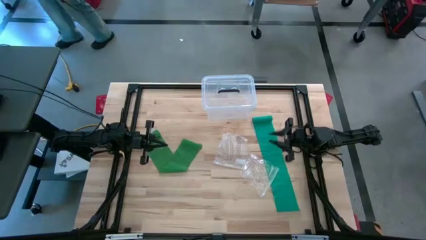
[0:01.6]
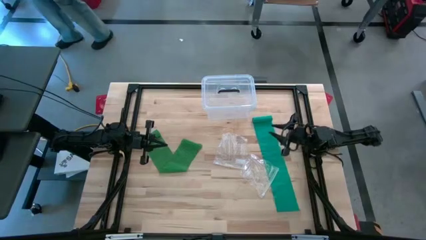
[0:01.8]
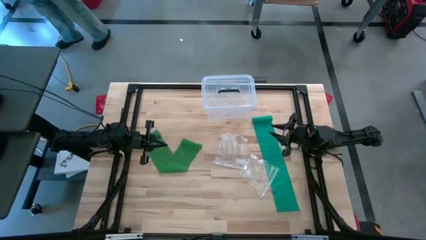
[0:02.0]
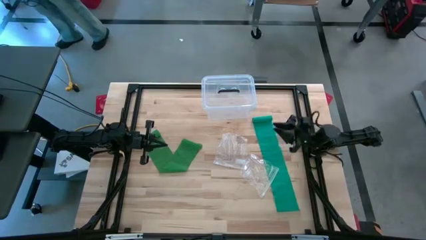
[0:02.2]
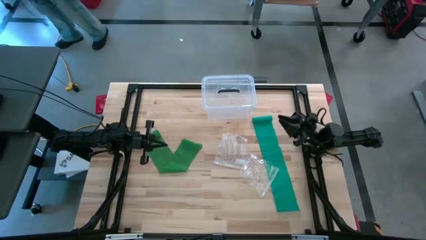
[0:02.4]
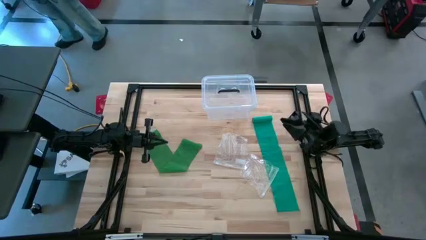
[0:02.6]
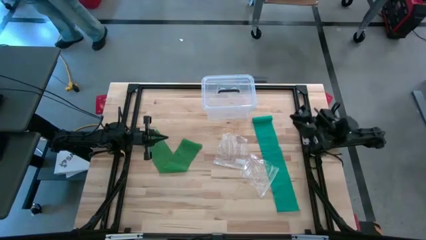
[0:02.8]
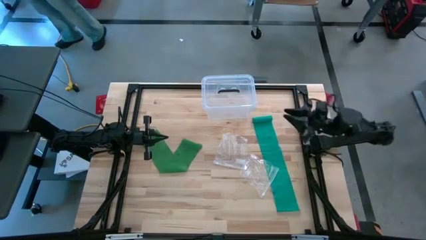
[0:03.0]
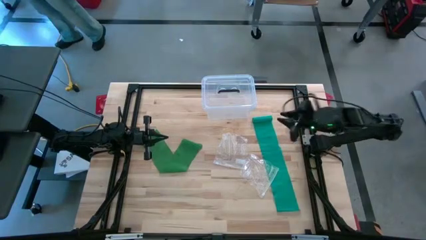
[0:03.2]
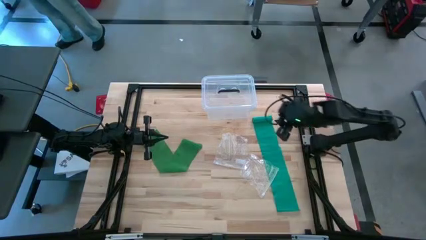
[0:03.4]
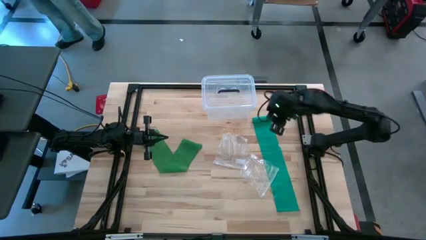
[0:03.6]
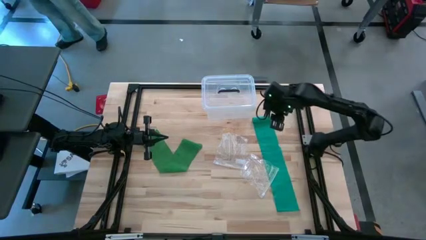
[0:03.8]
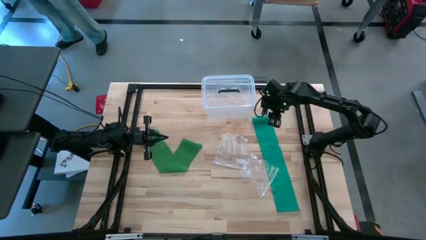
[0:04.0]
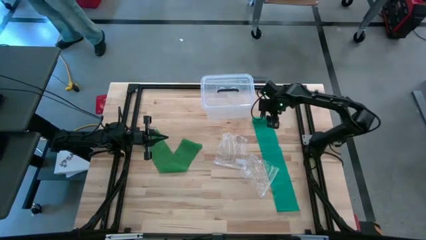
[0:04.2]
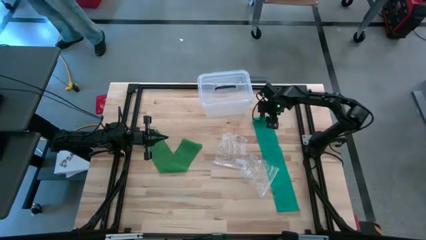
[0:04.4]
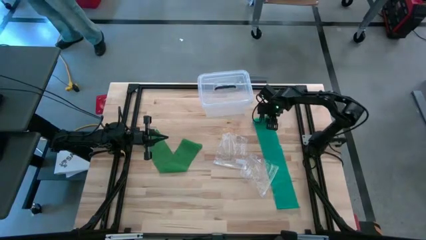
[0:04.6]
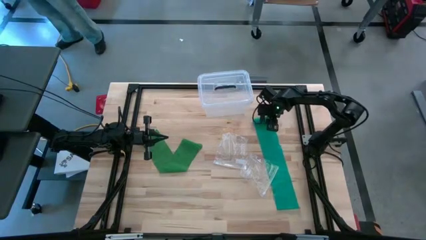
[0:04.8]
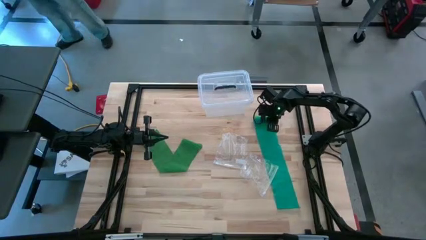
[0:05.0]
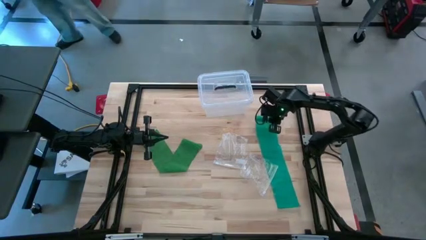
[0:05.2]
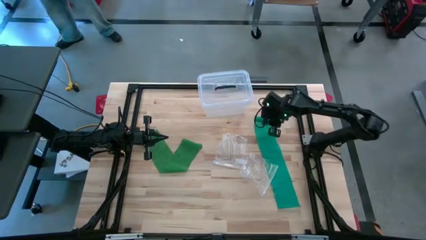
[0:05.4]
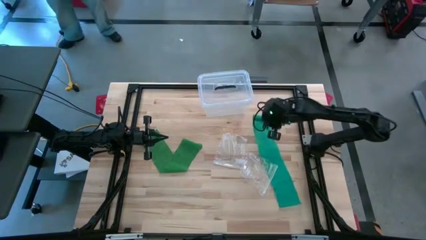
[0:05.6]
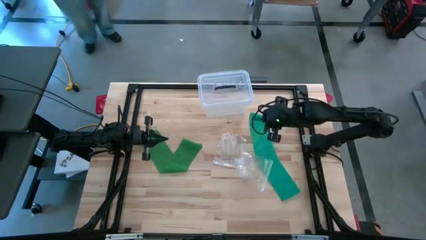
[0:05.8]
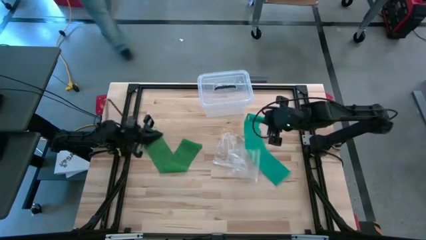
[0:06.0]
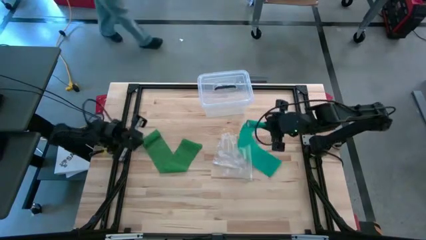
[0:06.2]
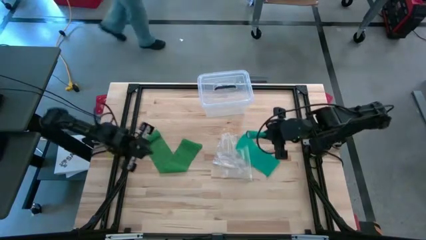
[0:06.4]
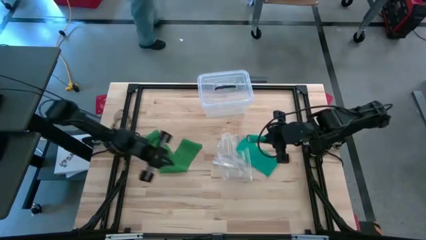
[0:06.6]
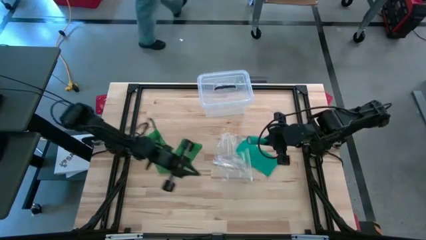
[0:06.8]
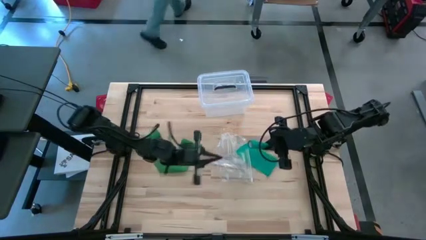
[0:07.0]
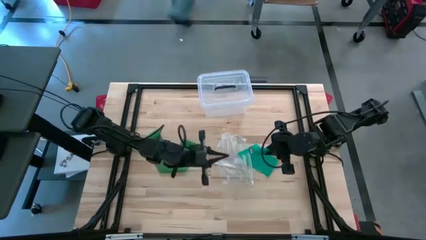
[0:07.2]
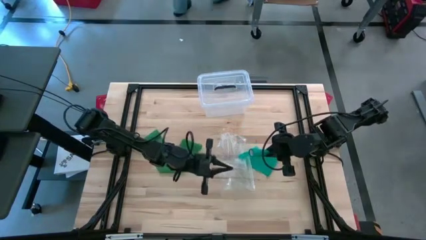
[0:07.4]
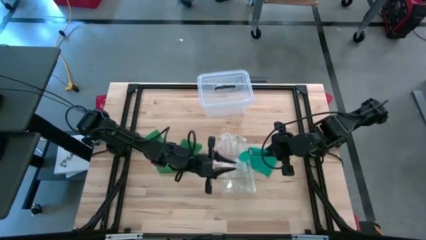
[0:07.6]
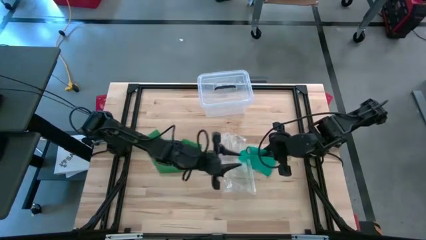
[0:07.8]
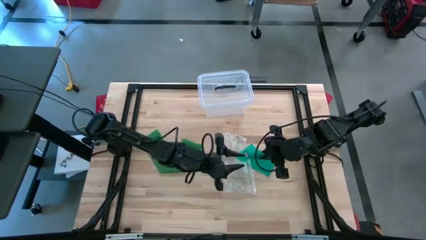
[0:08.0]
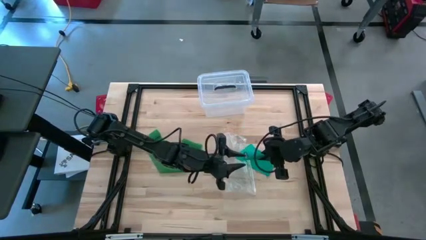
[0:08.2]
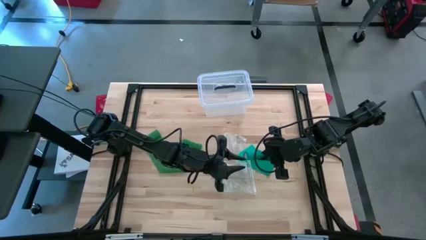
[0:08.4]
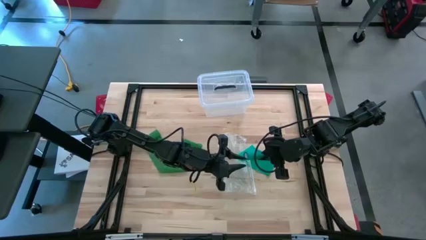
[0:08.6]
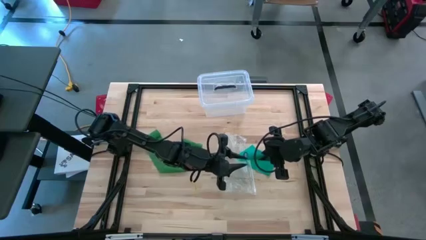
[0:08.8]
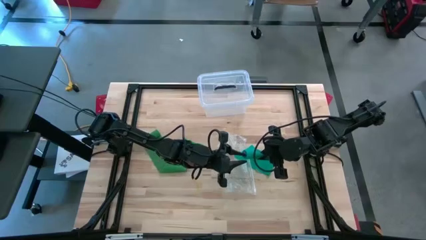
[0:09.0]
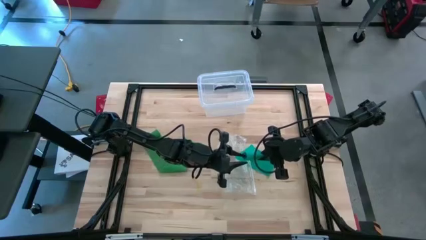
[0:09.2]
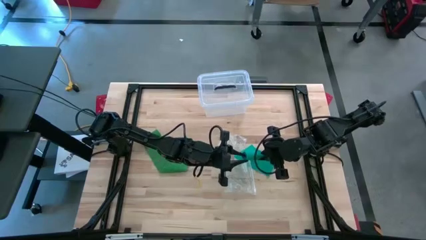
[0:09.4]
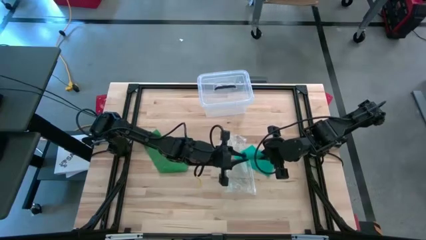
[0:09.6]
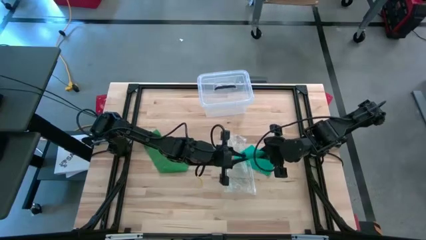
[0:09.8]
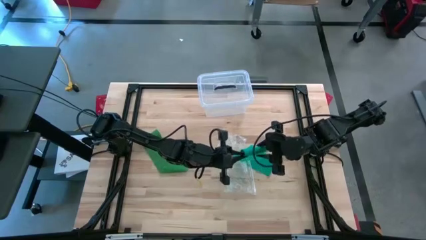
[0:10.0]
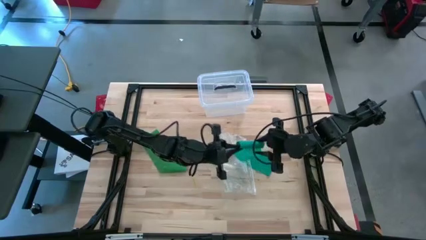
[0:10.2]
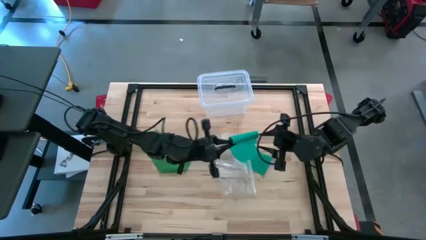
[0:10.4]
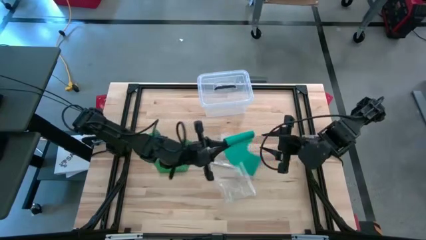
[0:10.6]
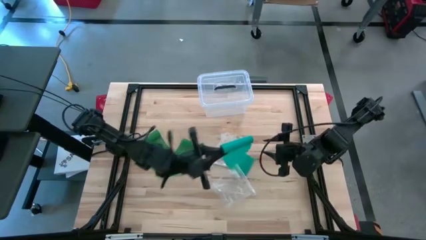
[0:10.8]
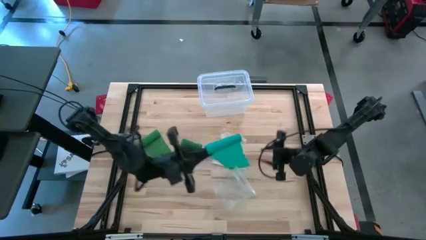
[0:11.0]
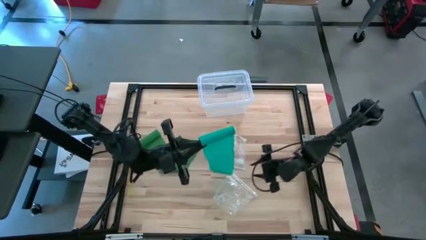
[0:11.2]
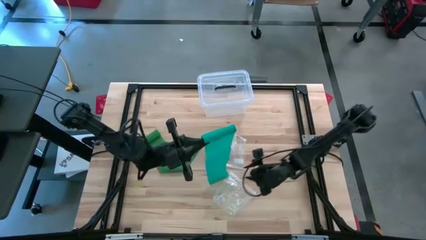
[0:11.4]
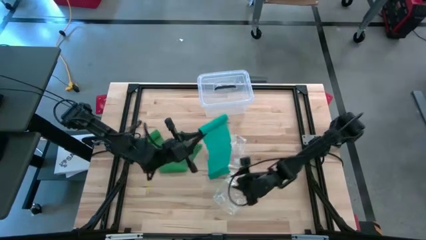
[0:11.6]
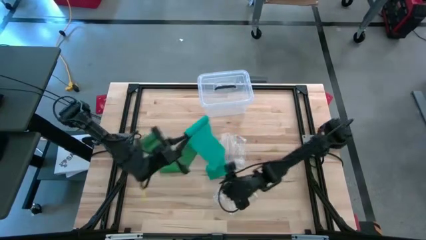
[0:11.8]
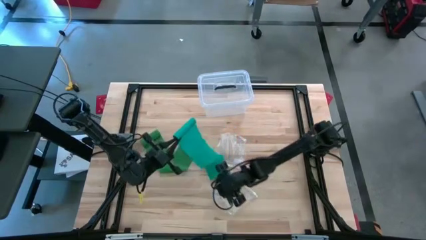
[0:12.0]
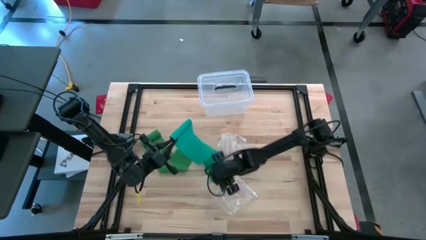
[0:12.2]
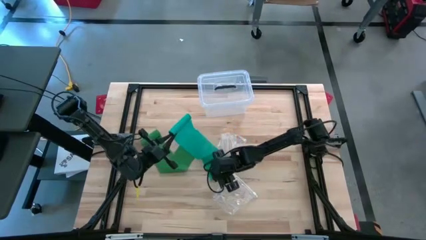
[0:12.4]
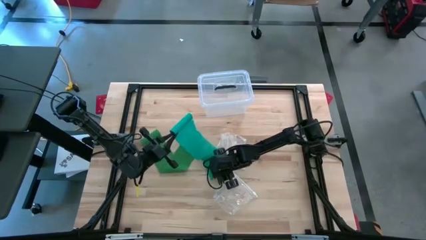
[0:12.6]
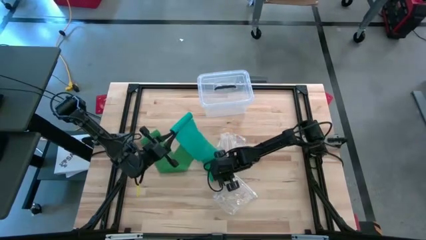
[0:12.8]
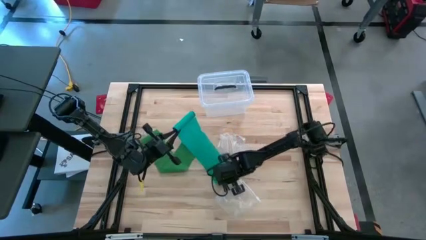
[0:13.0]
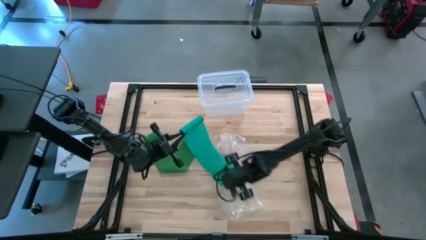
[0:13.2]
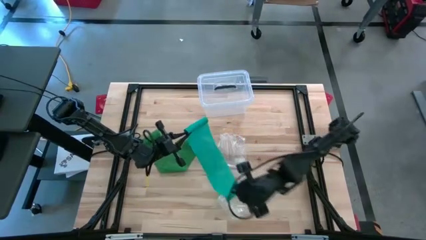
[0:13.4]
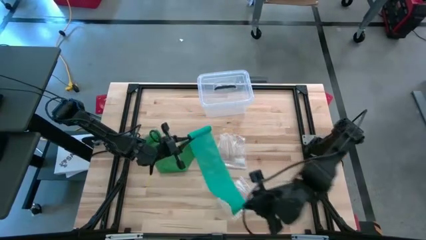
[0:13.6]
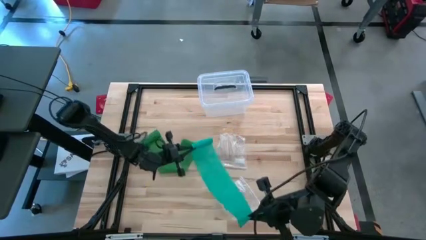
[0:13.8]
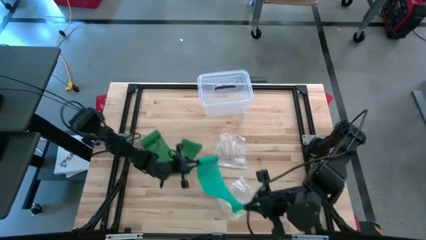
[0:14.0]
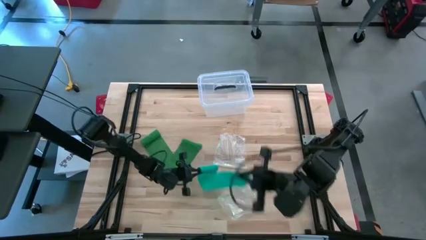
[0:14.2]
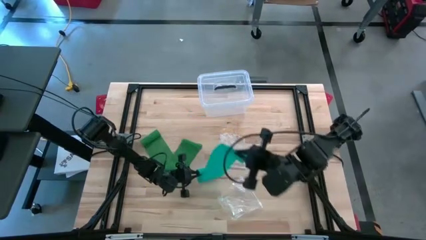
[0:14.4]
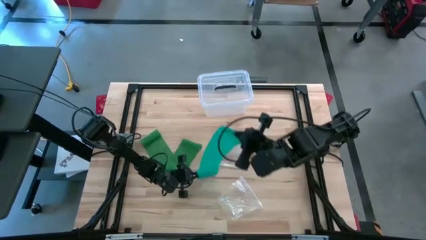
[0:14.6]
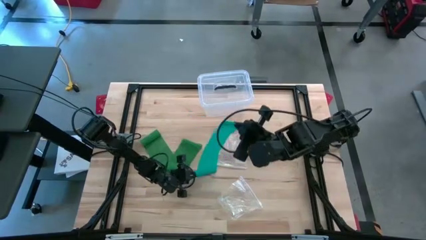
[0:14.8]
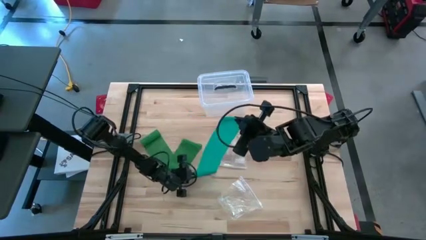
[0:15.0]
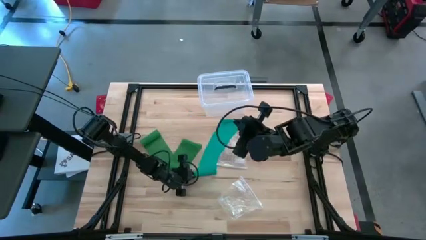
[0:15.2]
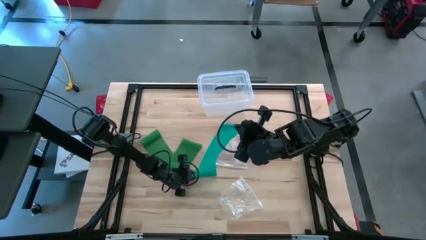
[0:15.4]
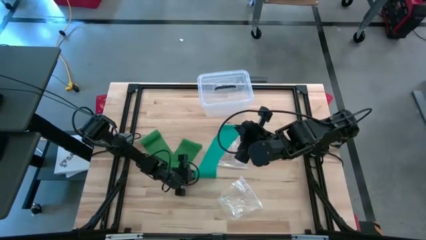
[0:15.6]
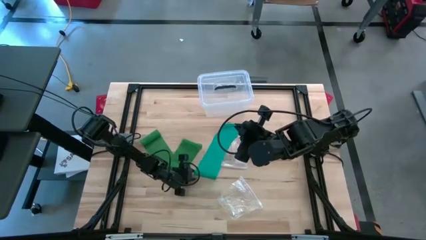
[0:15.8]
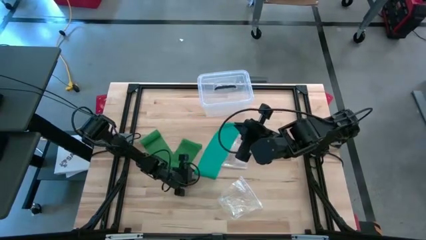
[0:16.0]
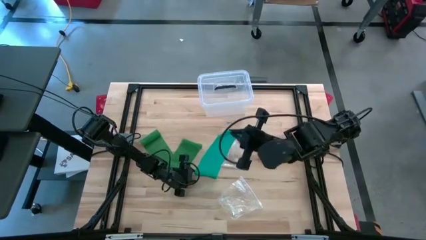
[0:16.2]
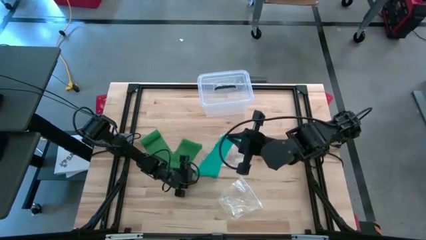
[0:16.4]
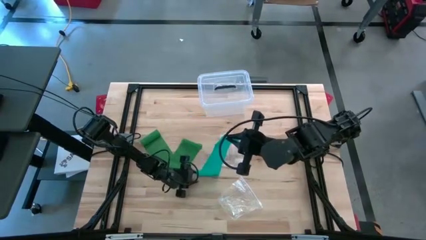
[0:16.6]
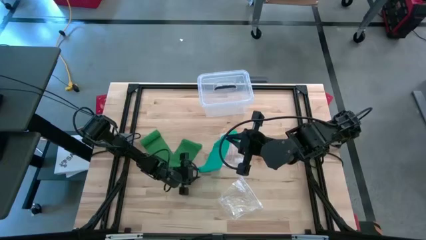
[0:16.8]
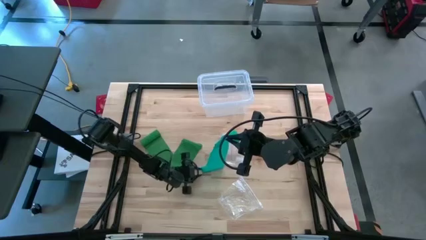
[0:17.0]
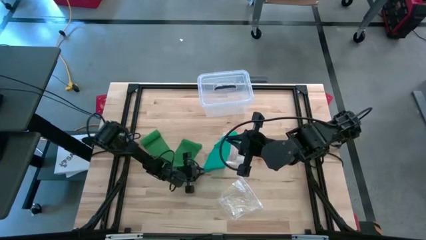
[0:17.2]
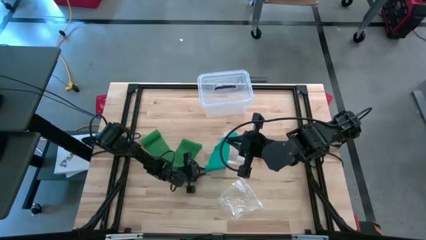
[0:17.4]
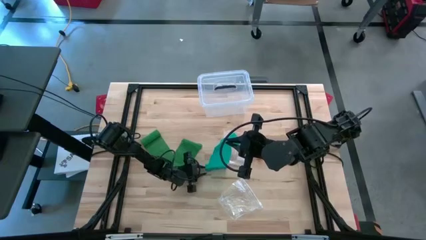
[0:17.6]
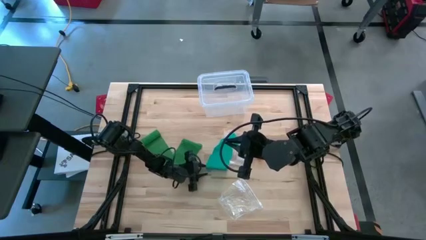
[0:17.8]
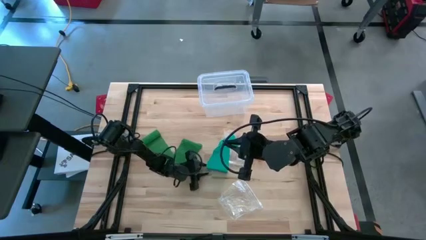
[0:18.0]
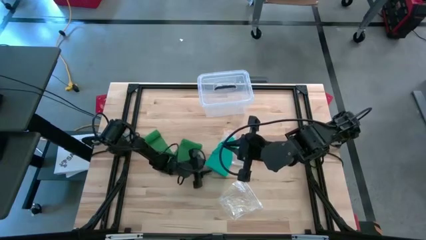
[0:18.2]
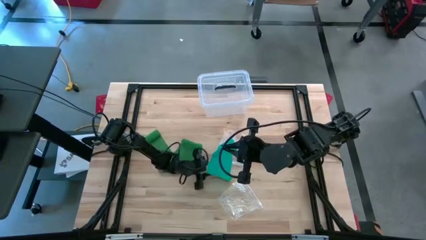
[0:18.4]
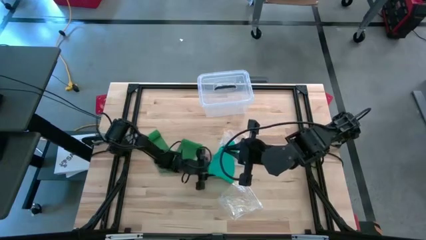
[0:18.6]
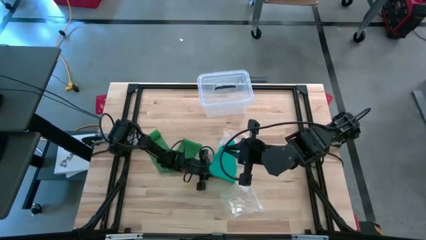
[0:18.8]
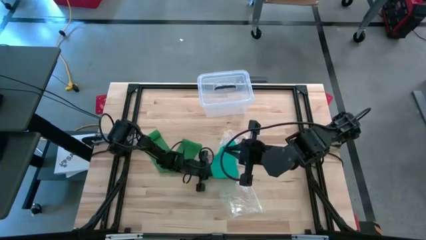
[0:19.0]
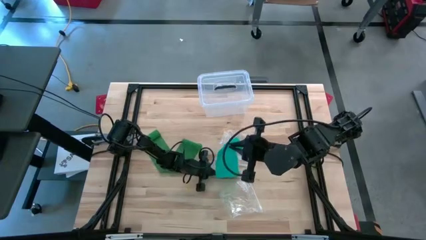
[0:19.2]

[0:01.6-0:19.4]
Task: Roll bandage
Roll the blue bandage
